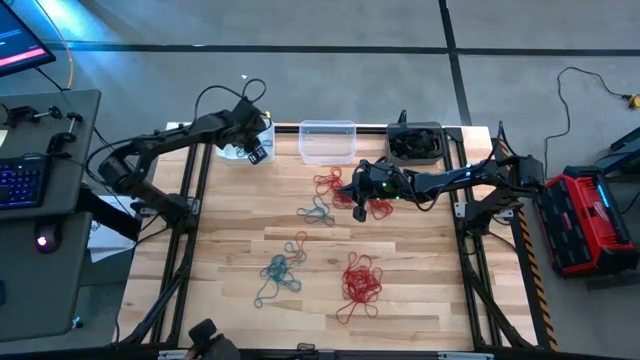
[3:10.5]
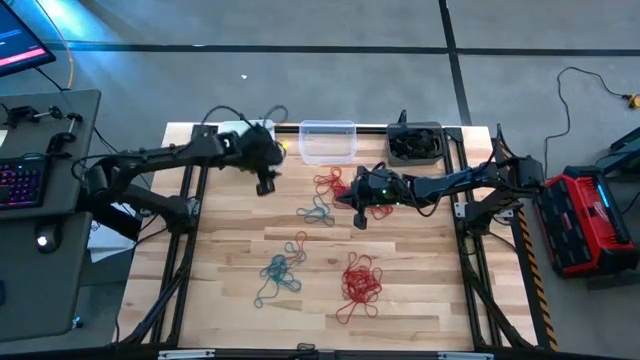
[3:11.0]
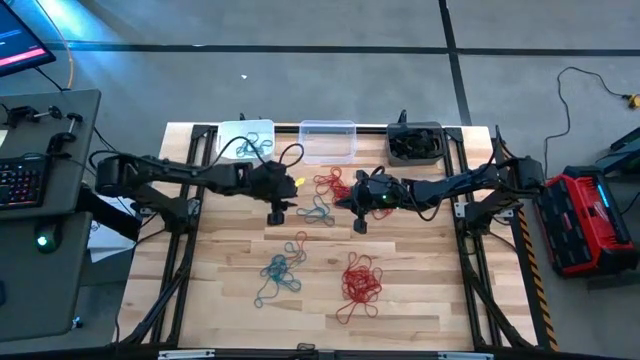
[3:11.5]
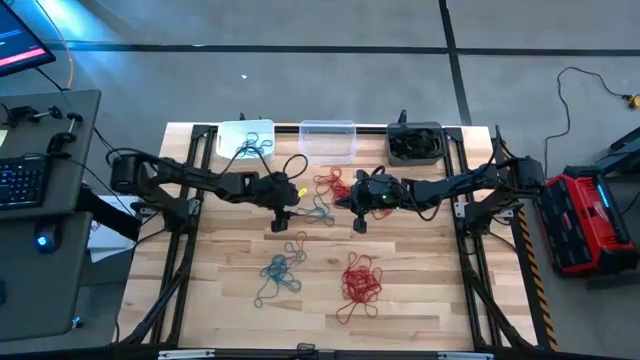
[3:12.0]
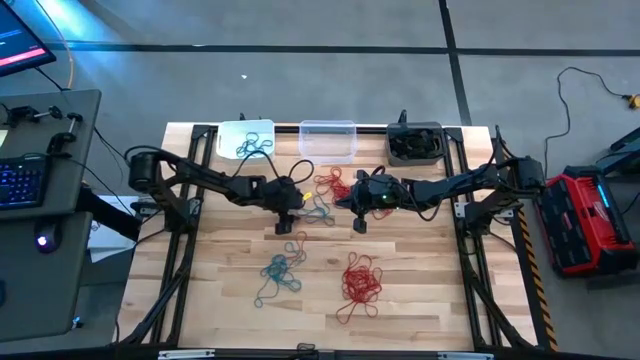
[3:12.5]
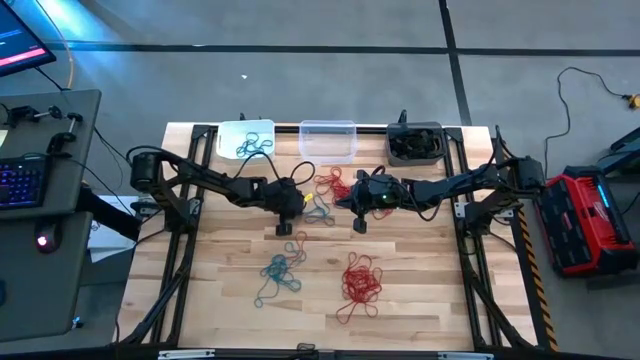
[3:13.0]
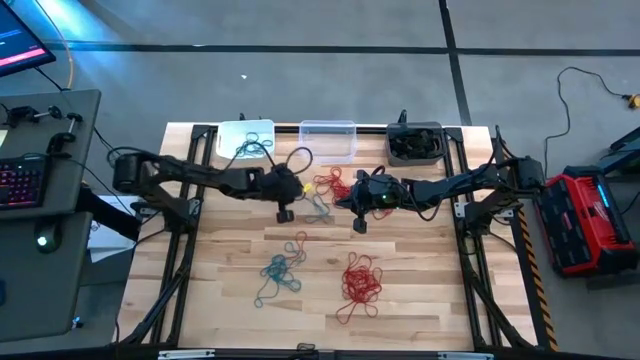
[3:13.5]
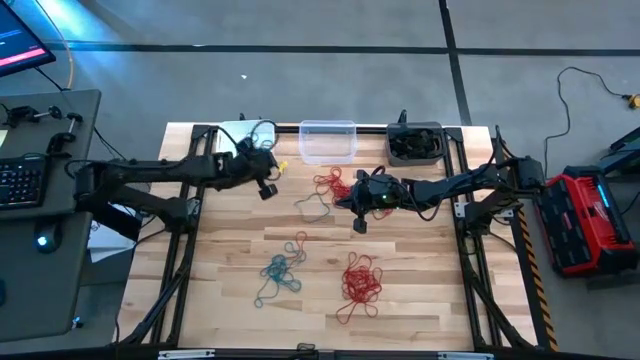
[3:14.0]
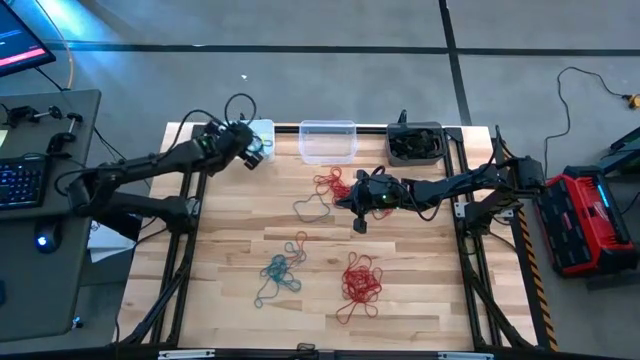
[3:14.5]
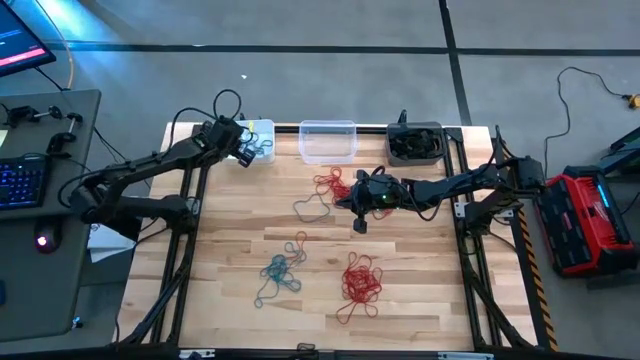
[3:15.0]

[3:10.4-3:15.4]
Task: Sort rubber bands into baskets
Put the blue rubber band into the white bin

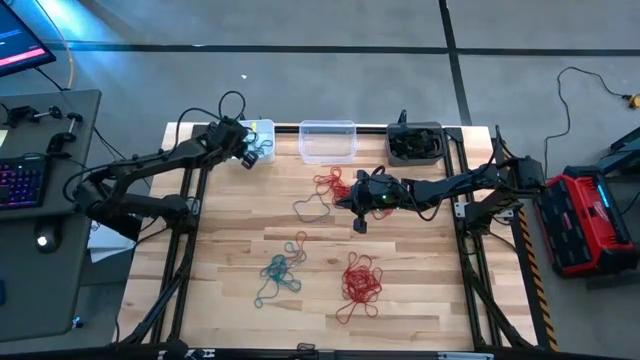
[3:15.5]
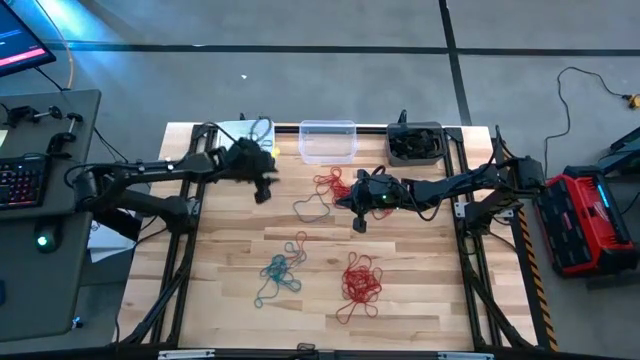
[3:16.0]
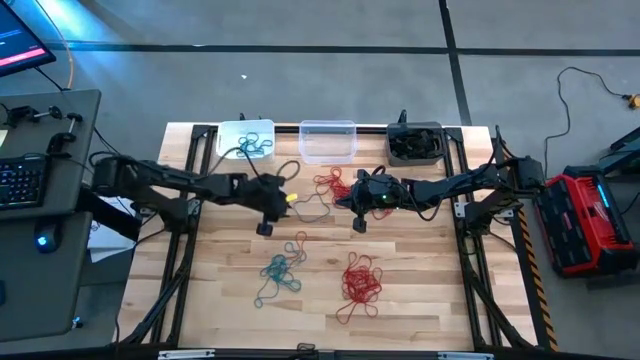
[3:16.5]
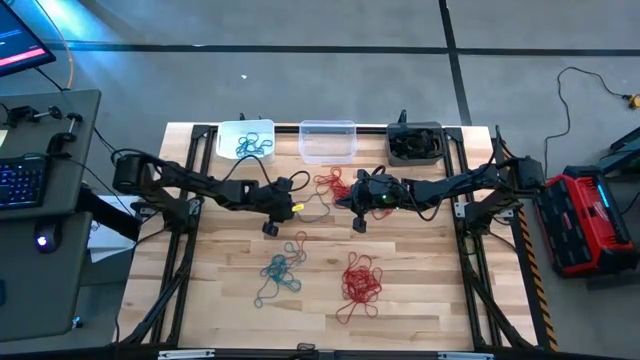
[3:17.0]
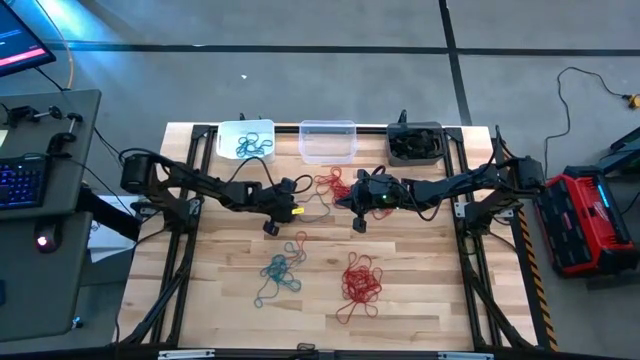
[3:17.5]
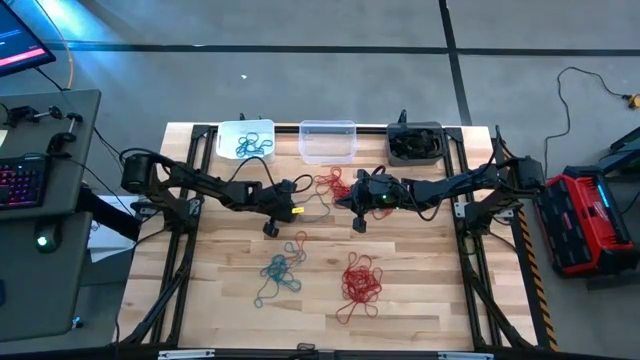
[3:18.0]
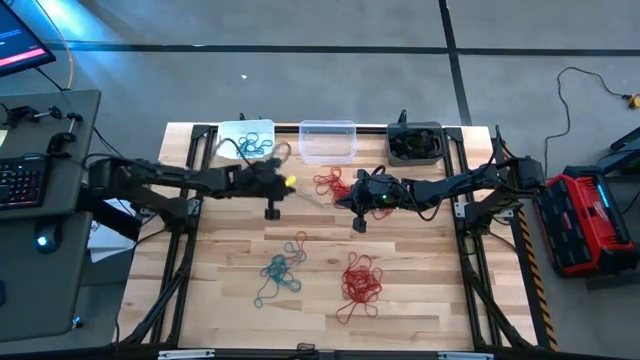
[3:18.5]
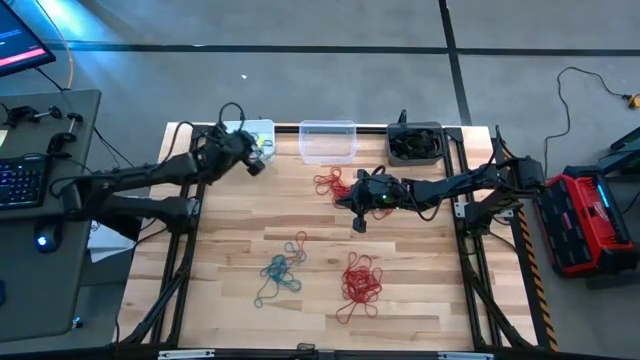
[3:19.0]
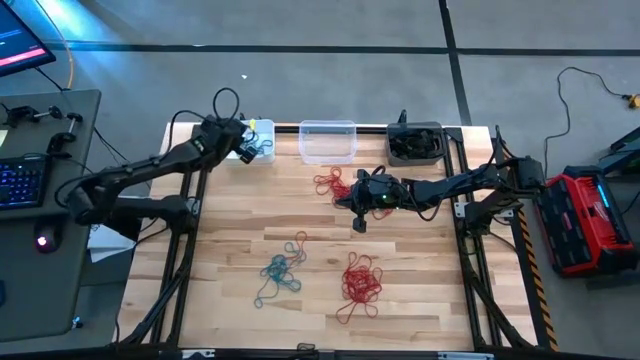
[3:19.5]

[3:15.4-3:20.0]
Put the blue rubber band into the white bin

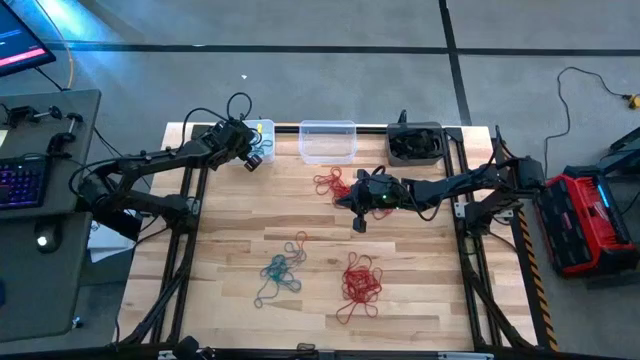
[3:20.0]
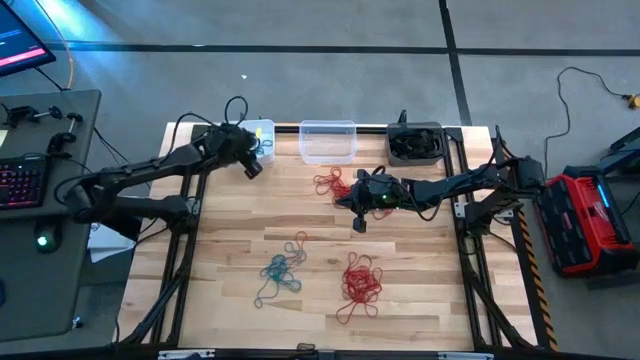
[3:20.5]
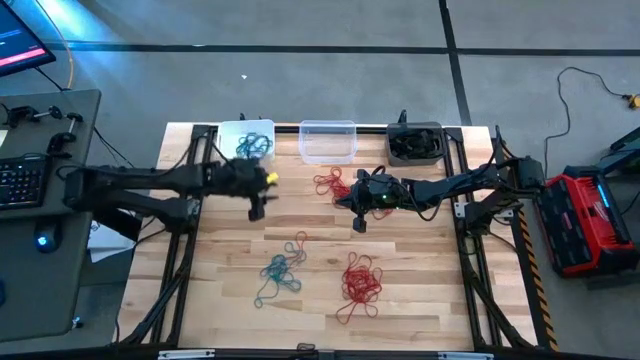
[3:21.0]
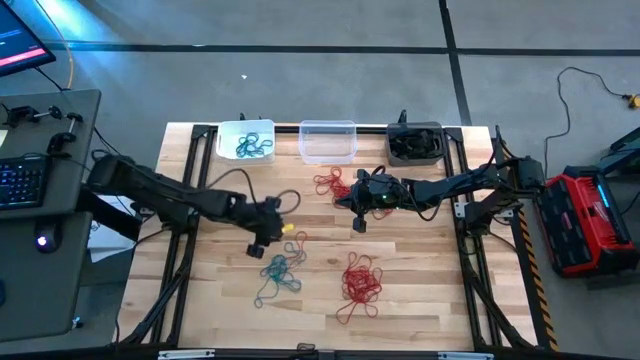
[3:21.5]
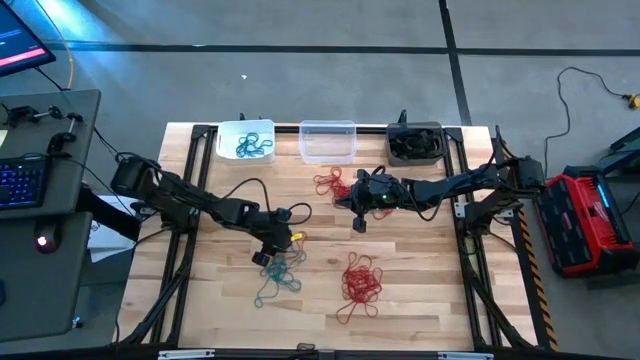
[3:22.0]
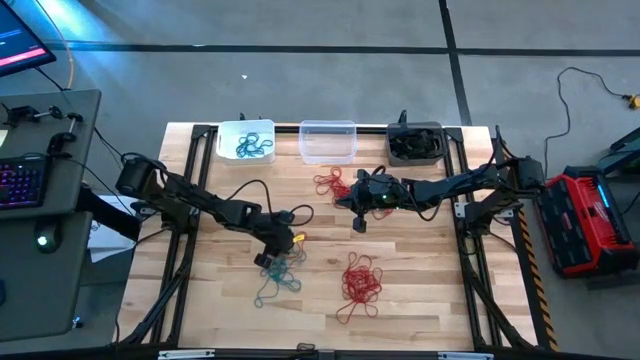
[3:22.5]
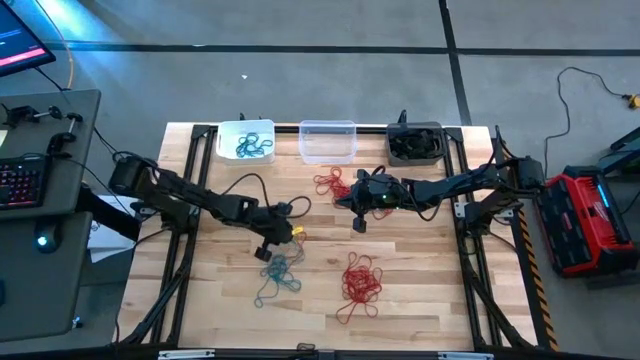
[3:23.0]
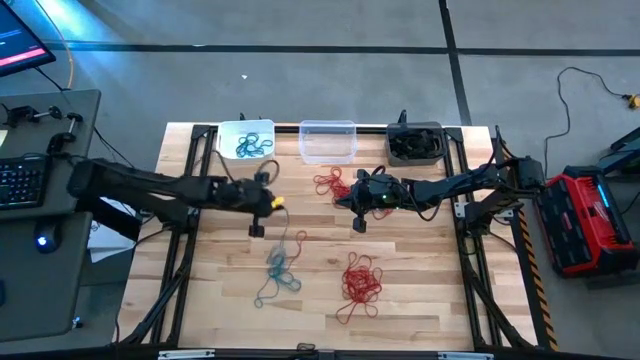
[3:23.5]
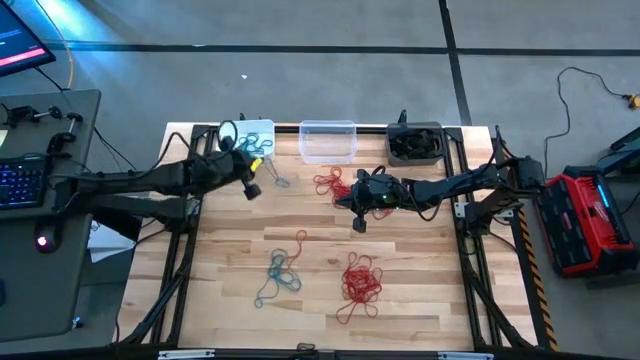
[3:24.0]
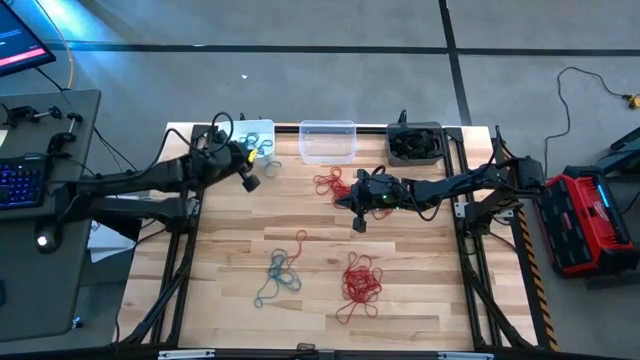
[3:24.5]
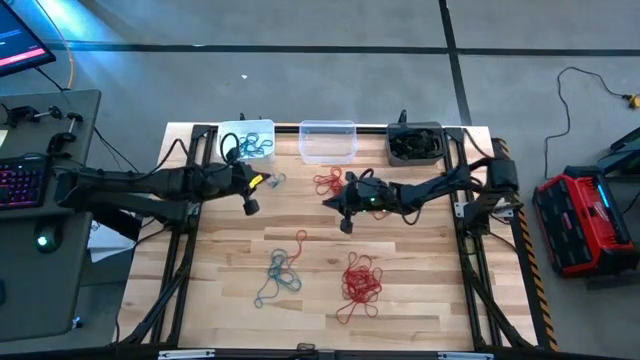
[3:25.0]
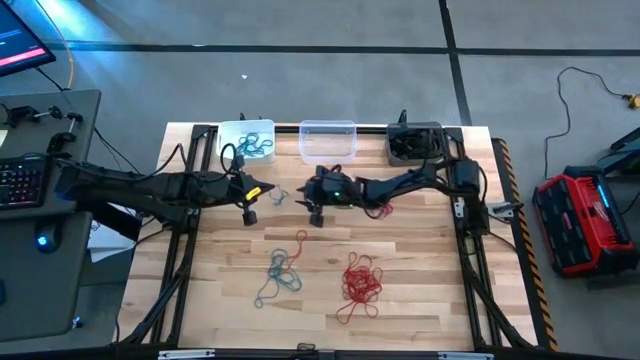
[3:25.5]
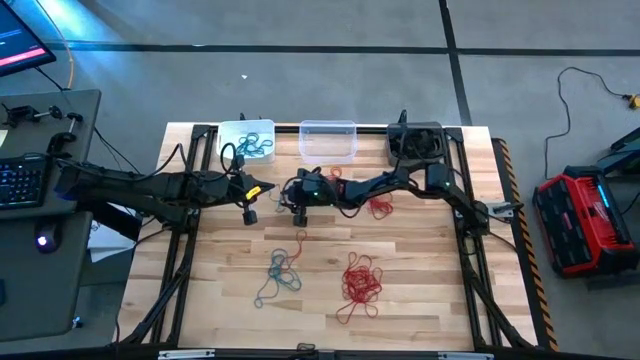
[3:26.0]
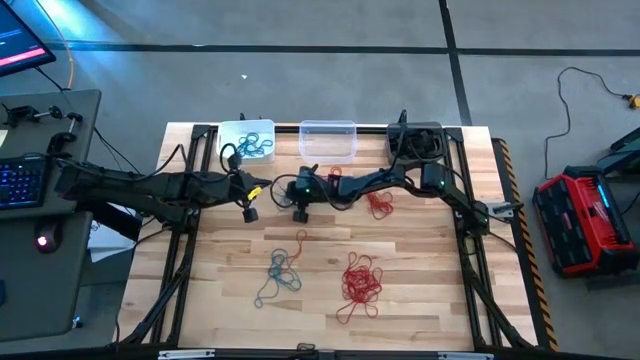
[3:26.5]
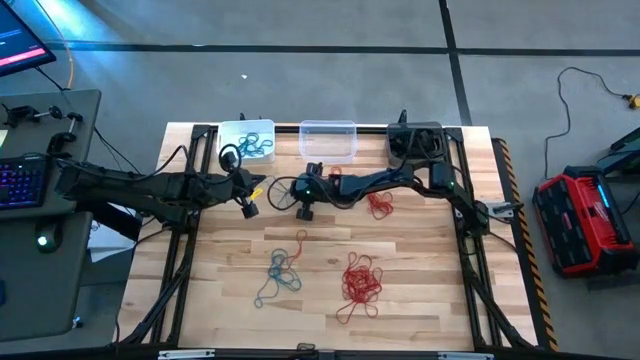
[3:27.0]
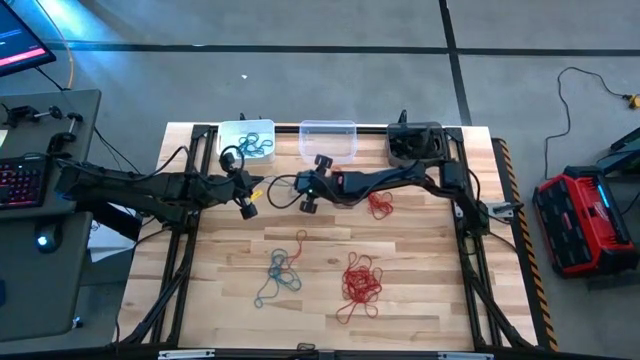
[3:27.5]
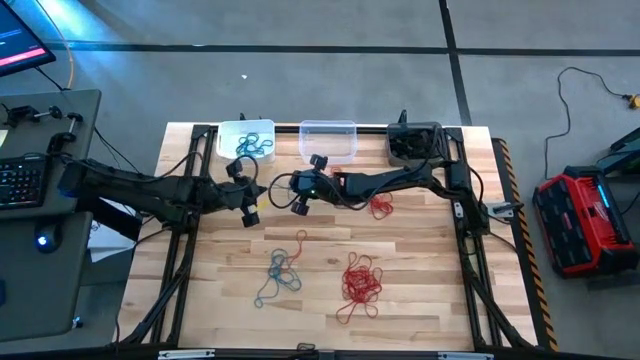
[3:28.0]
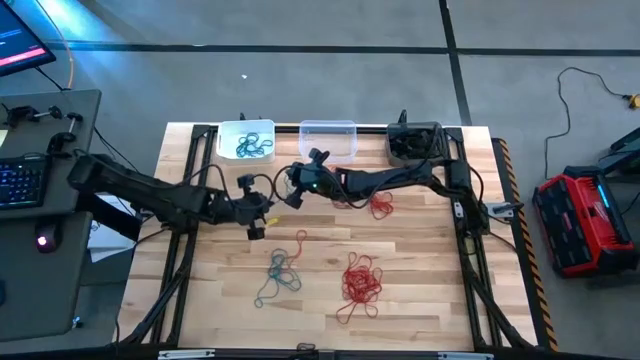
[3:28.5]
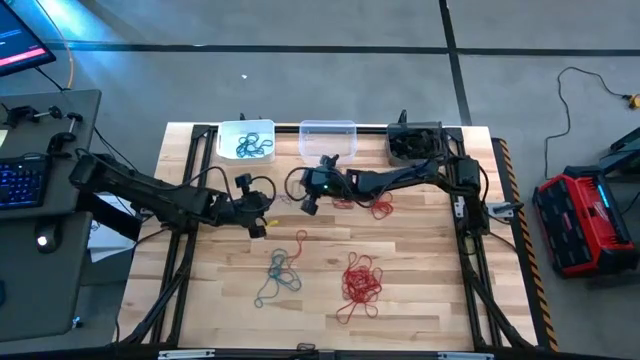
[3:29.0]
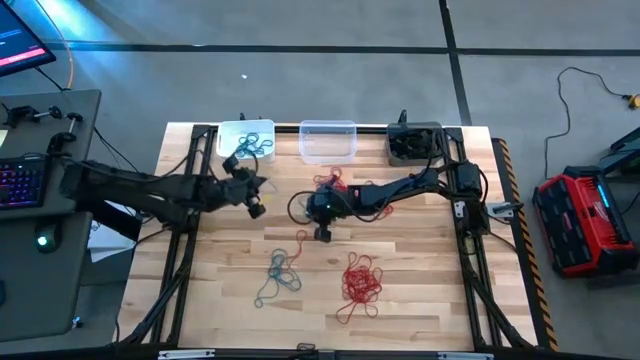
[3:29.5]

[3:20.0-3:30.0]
Put the blue rubber band into the white bin

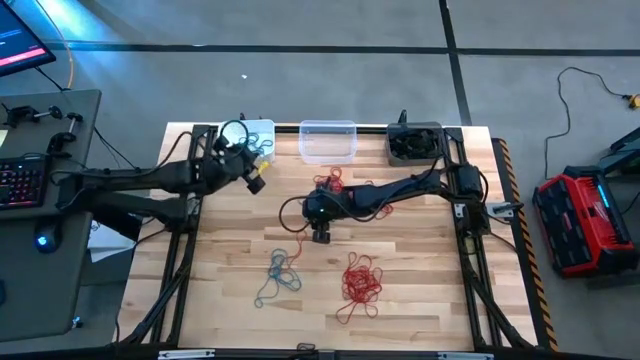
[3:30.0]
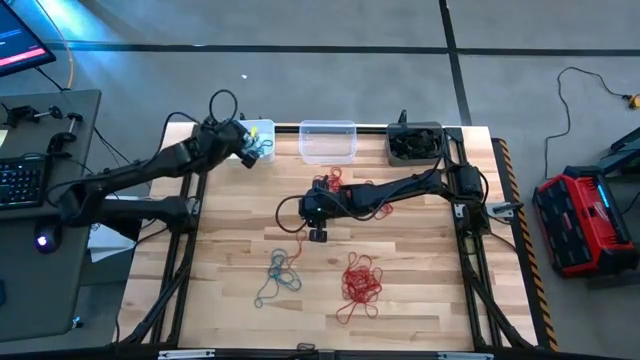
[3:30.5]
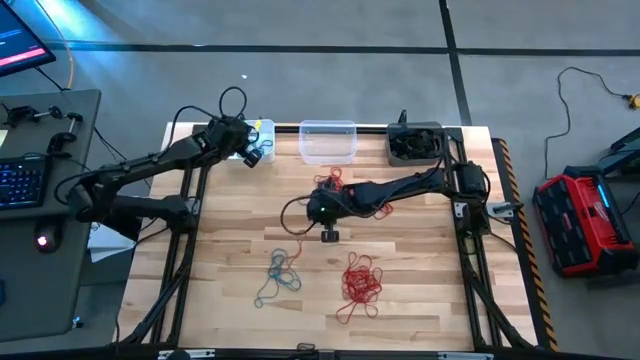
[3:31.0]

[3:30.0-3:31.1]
Put the blue rubber band into the white bin
